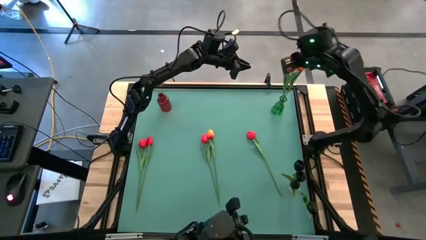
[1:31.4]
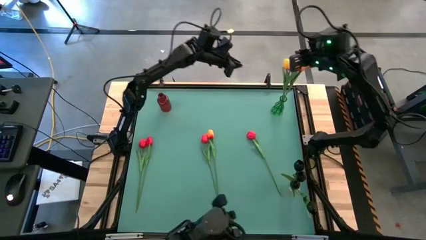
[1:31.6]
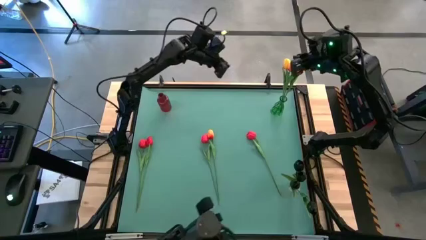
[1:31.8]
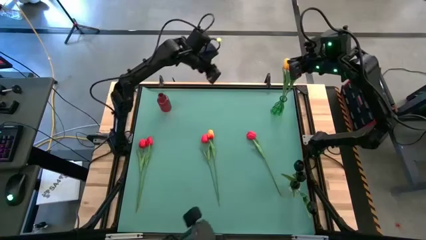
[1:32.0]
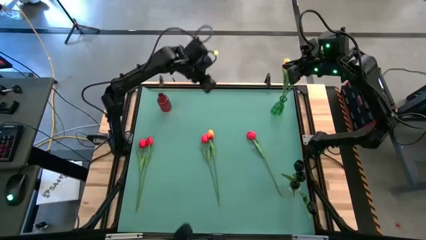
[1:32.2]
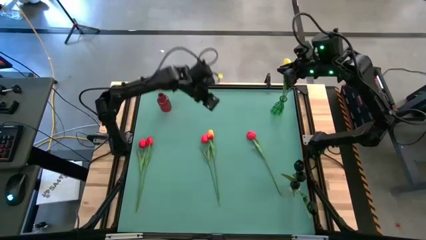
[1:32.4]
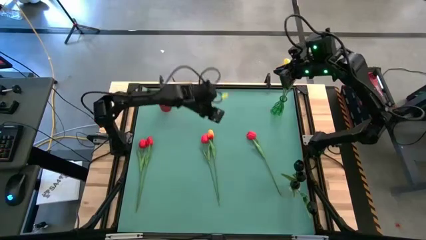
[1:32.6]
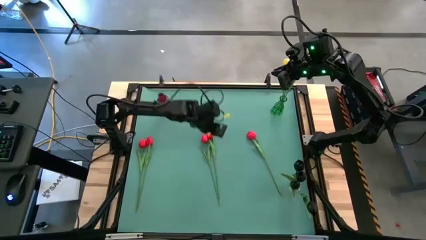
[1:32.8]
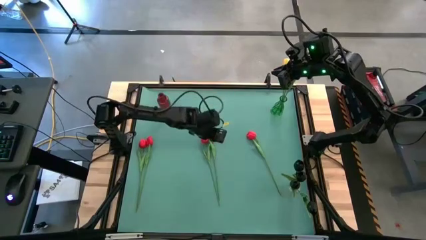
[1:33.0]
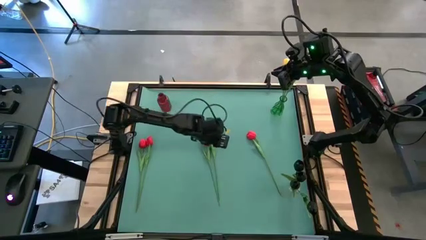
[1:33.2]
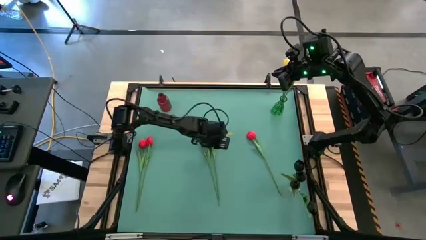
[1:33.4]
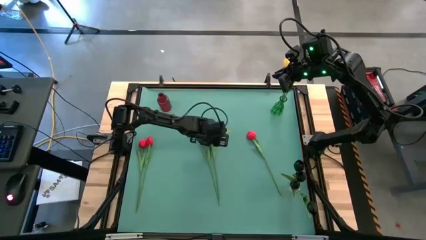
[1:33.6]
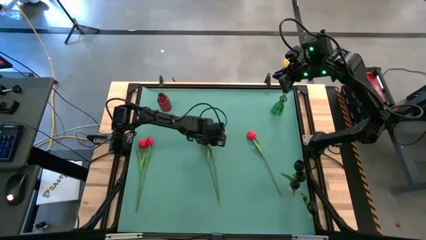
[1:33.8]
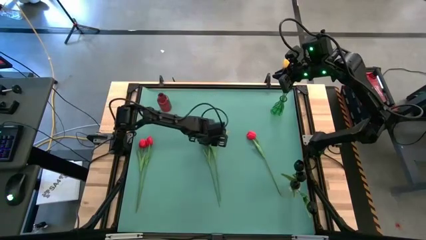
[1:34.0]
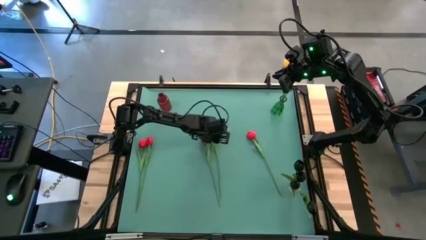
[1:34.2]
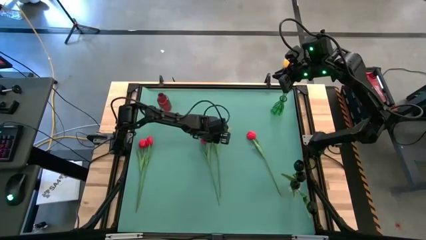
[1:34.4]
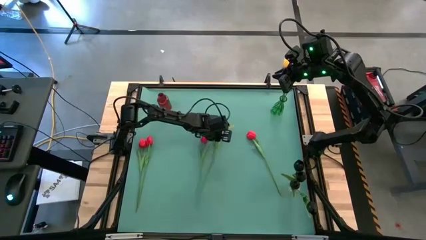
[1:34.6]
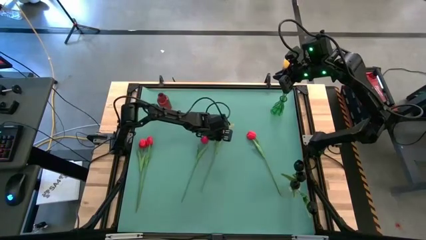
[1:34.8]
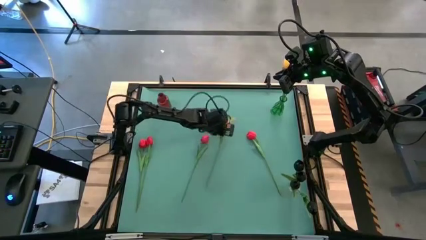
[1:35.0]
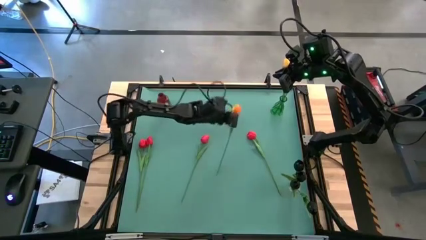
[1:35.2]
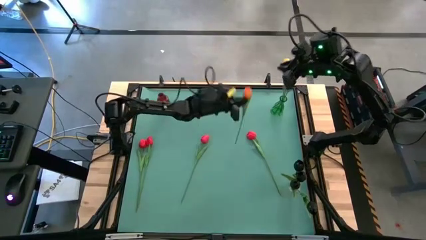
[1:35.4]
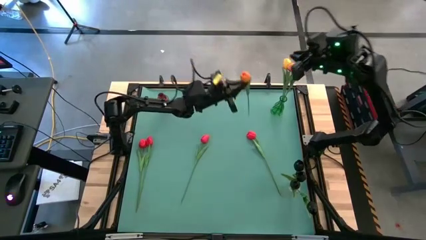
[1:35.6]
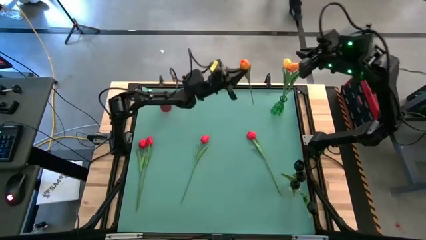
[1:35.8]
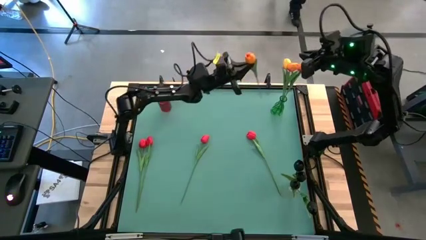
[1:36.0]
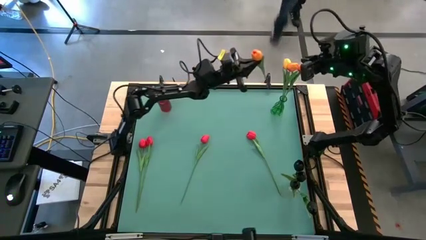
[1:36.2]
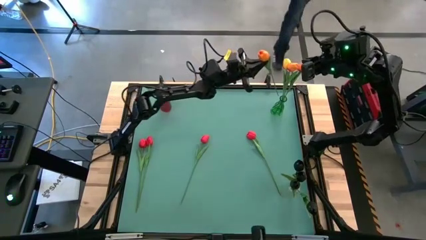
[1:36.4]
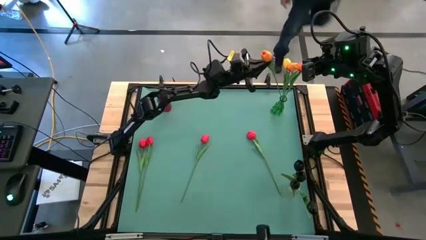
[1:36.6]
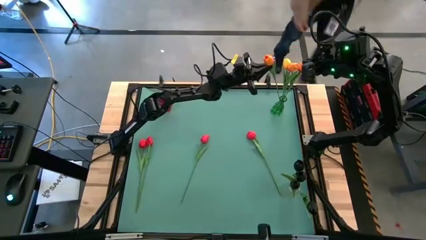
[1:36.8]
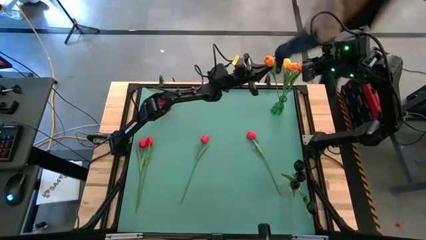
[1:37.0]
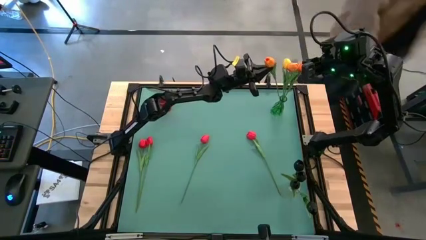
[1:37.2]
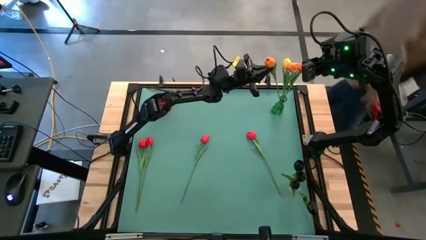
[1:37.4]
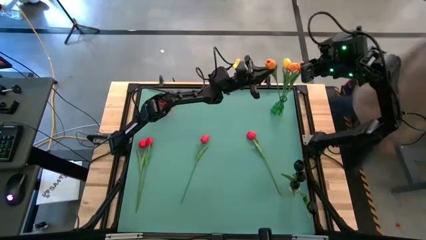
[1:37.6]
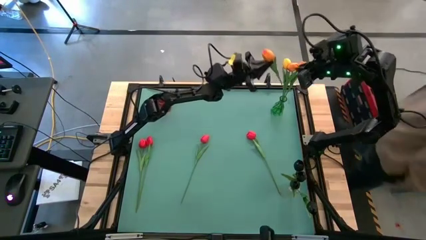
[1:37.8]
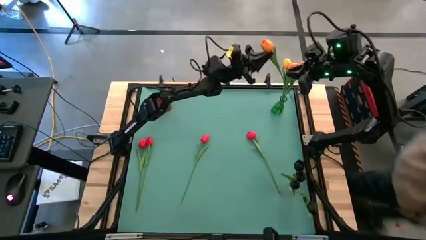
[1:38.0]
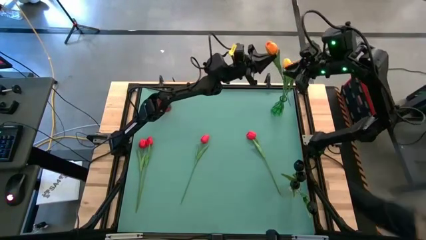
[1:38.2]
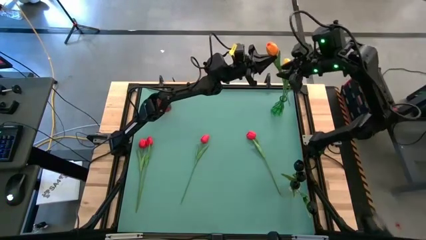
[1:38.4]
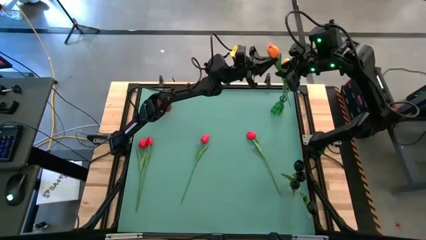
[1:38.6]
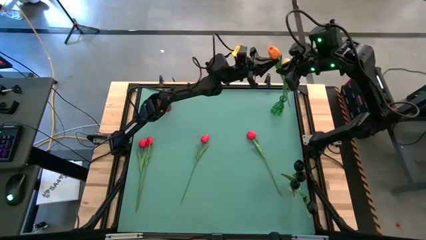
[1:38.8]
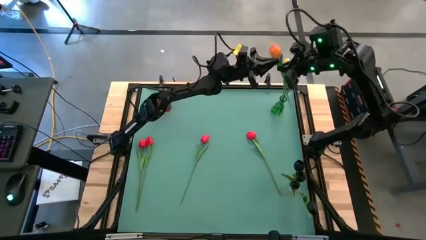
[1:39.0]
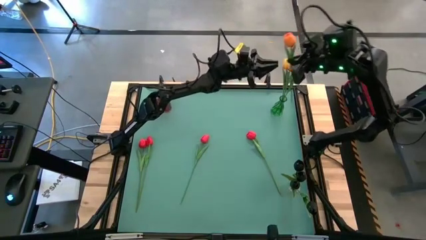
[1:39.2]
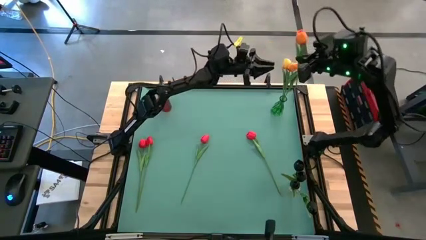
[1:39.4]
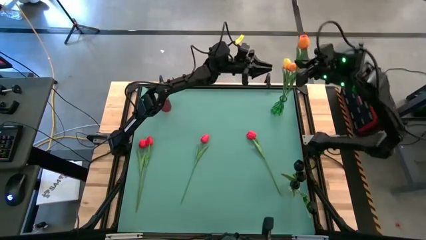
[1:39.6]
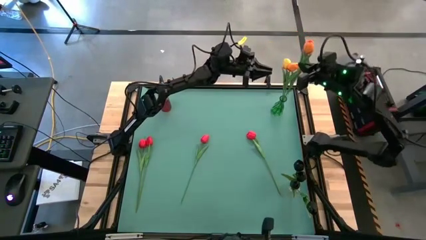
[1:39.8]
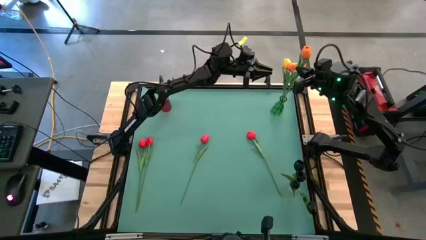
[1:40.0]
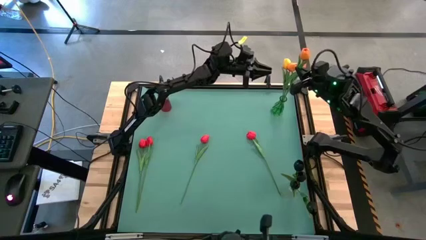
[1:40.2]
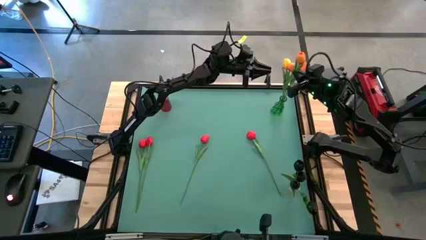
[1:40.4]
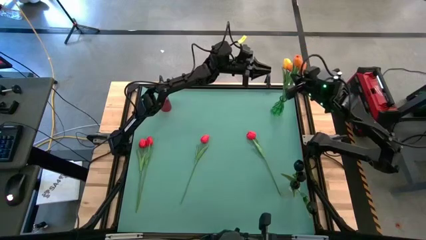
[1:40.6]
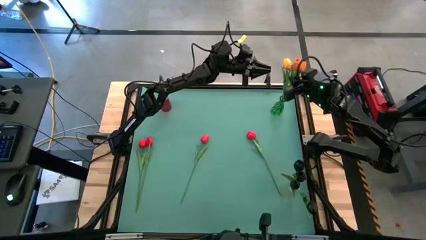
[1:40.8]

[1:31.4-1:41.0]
Task: Sort flowers into vase by color
Put the orange tulip into the green flower vase

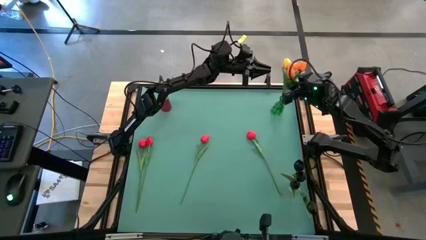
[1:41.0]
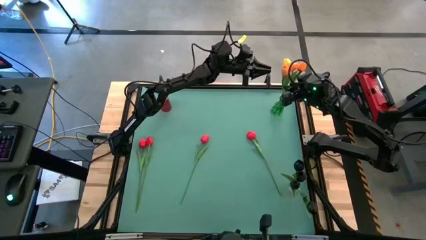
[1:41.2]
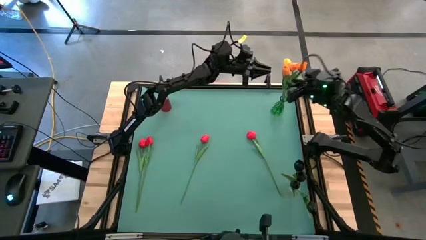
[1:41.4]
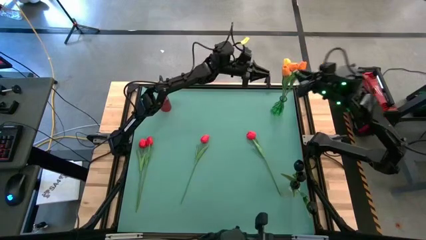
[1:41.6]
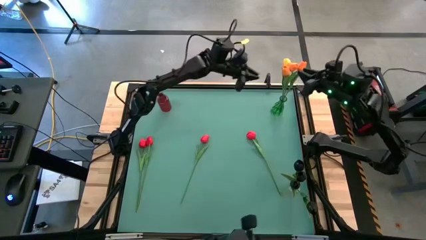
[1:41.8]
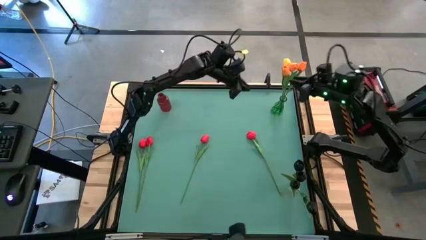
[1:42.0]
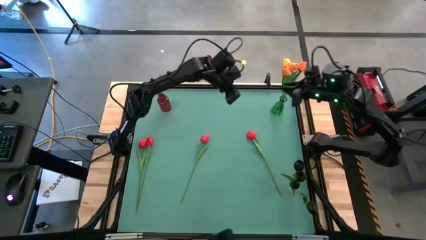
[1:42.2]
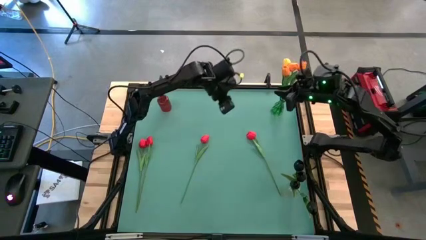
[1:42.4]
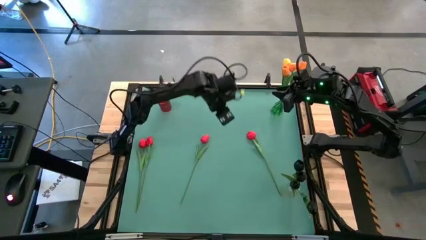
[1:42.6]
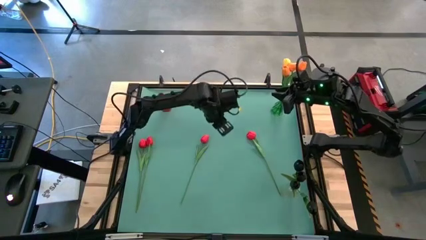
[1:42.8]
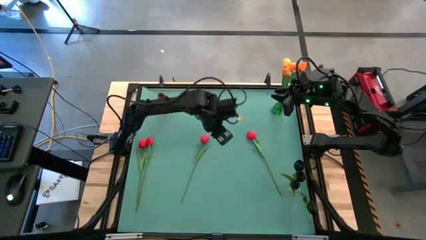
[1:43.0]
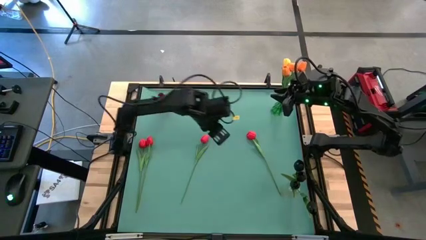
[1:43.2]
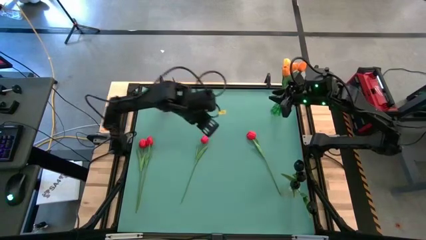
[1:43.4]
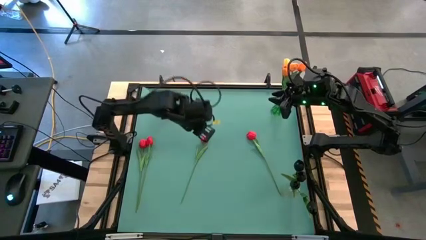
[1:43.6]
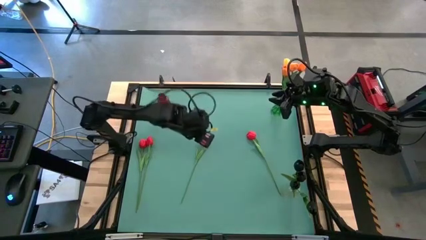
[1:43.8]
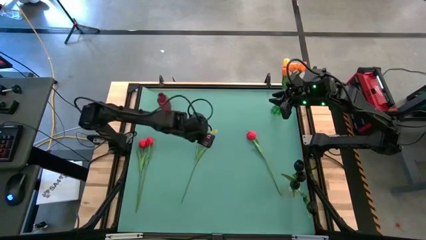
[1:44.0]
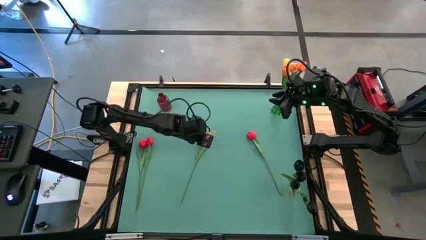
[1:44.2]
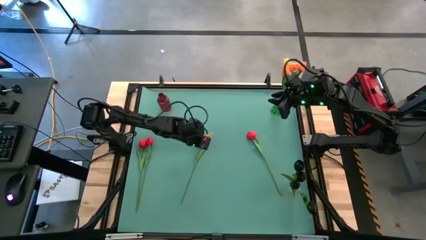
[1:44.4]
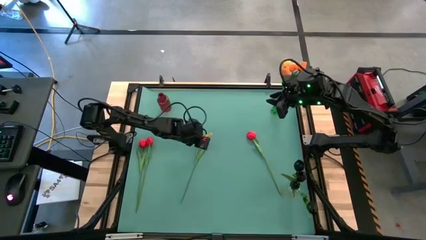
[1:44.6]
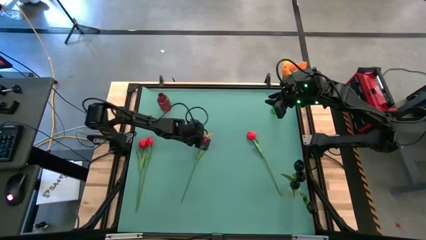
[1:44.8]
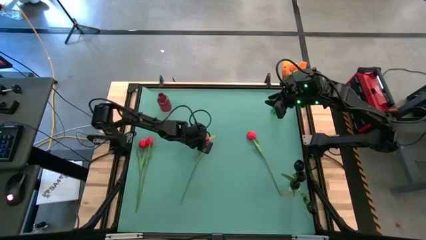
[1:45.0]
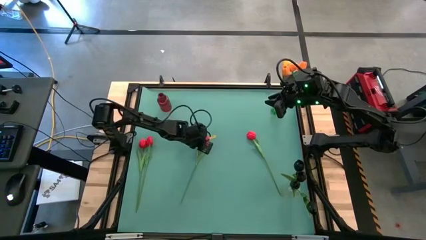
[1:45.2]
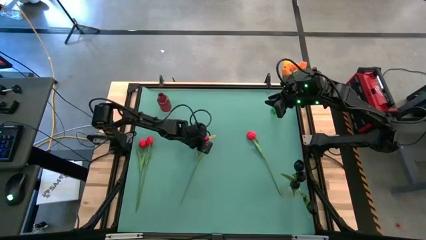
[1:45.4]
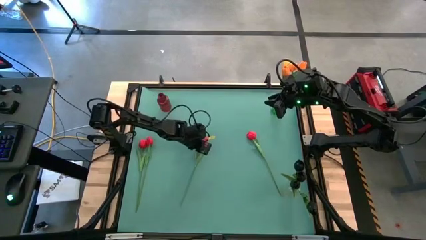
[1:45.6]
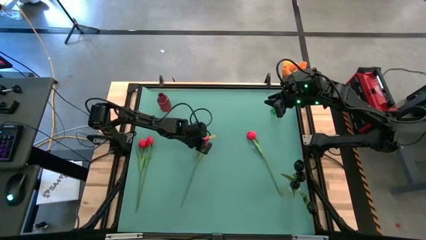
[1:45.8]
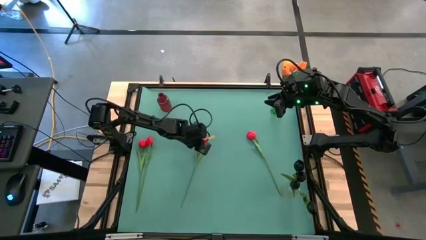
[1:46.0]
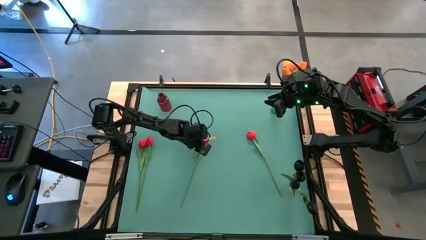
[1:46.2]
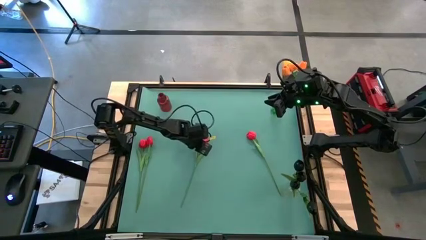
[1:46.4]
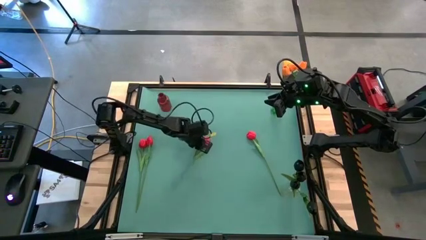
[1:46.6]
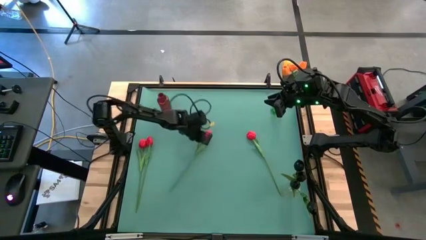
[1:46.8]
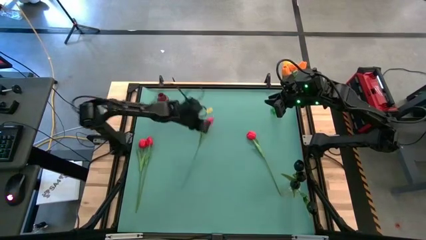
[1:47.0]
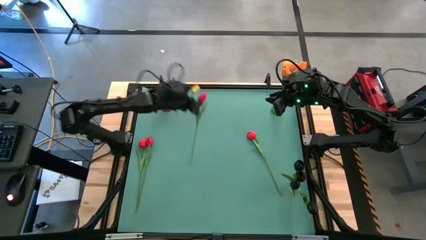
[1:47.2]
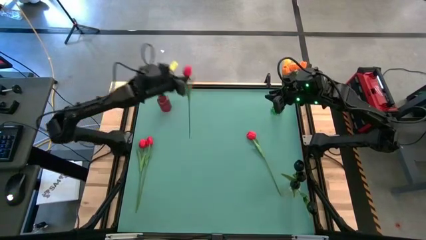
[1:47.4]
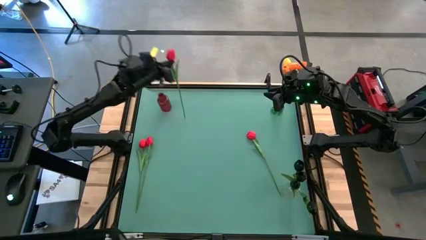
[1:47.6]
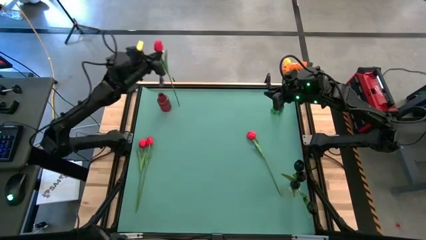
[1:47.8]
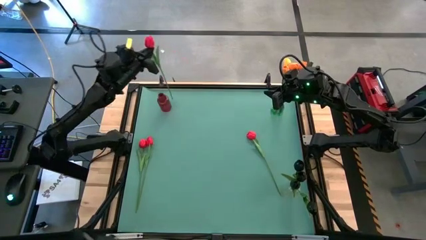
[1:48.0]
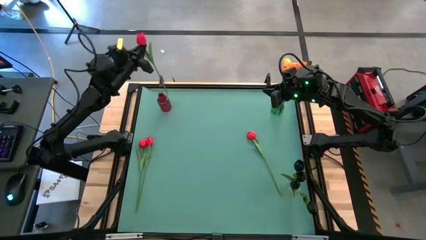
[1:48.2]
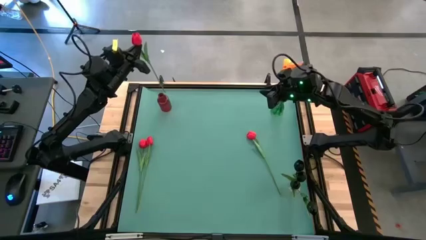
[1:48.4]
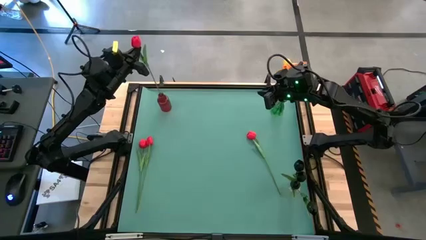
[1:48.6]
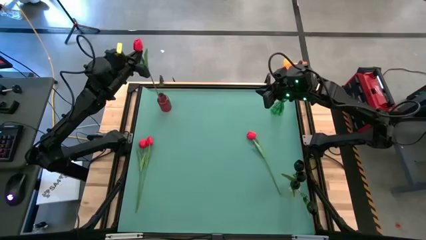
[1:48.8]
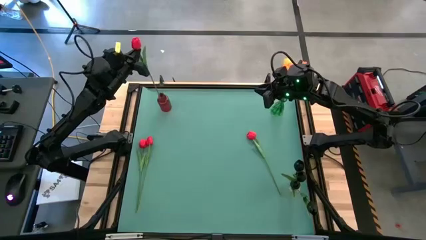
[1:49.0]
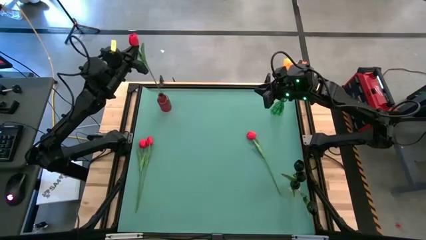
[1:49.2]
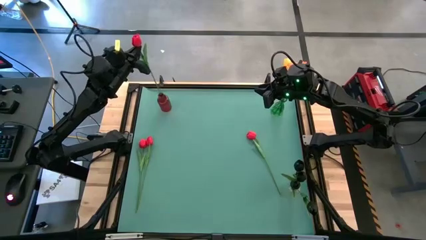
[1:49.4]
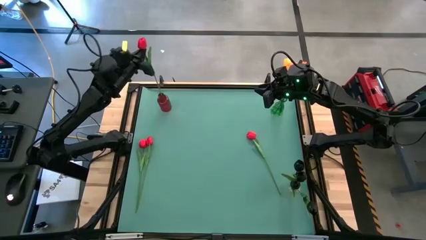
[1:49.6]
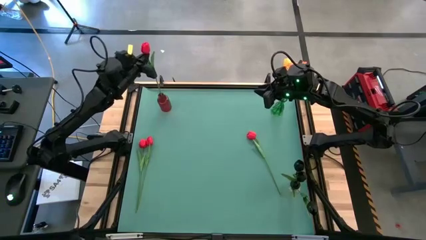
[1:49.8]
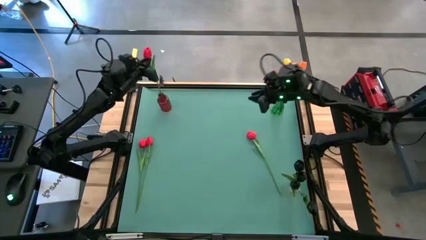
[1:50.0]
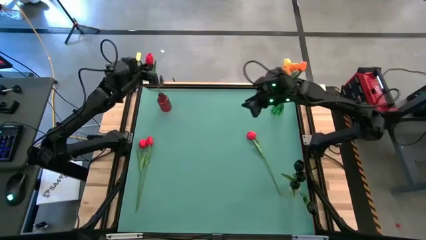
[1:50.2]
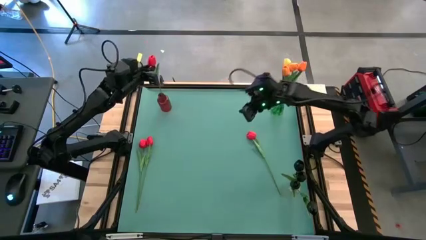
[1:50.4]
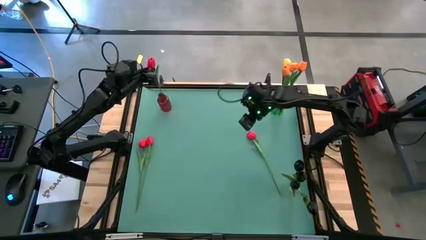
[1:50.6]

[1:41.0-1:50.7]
Put the middle right red tulip into the red flower vase
